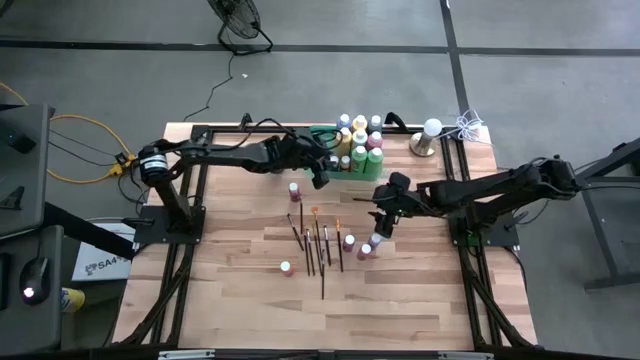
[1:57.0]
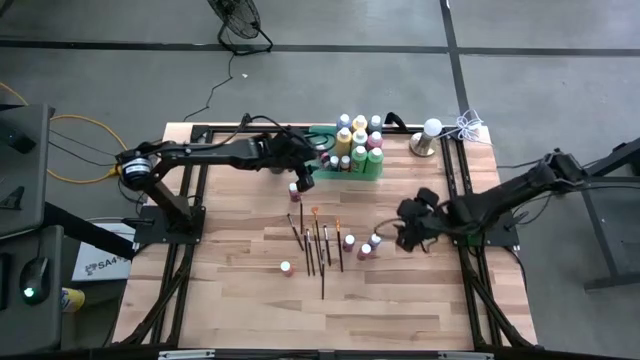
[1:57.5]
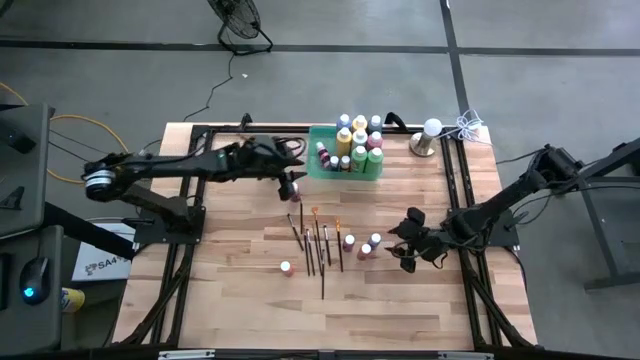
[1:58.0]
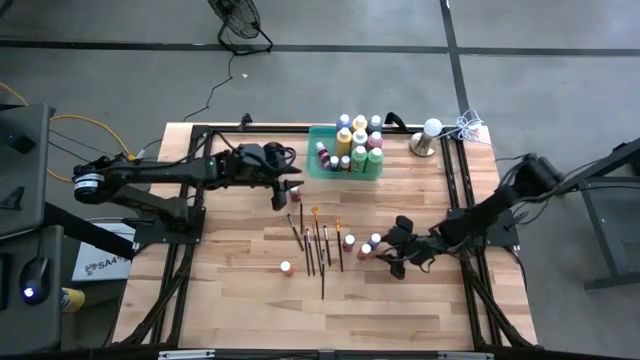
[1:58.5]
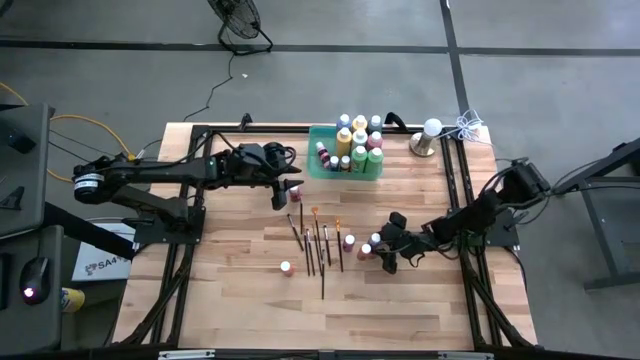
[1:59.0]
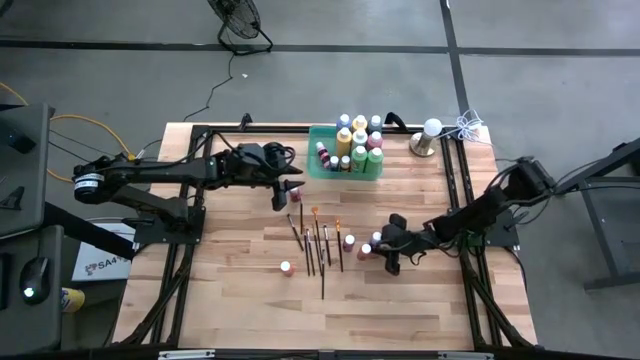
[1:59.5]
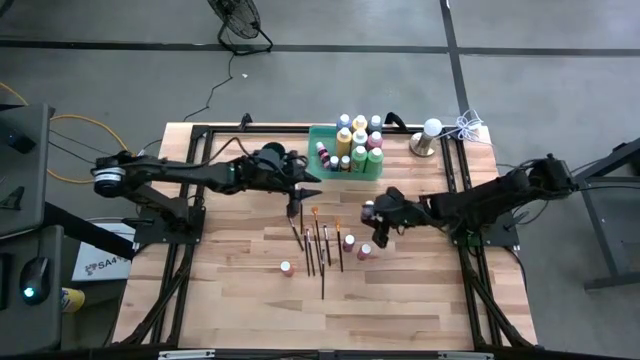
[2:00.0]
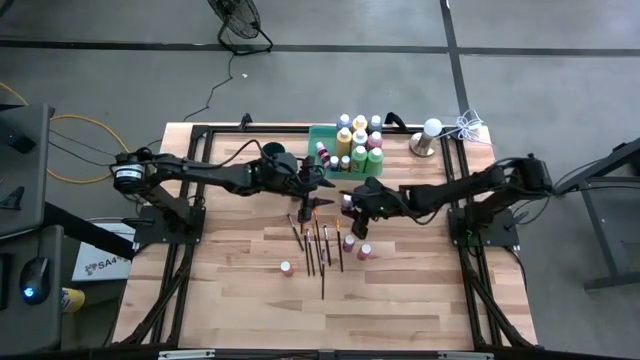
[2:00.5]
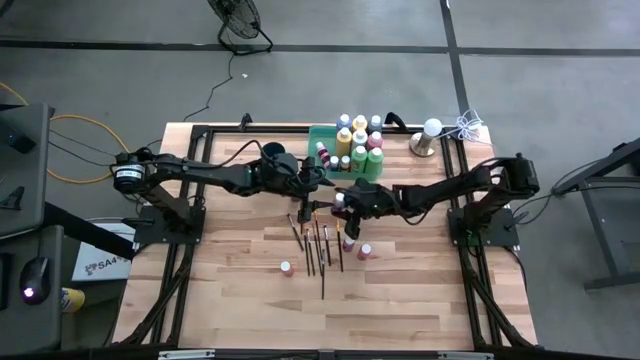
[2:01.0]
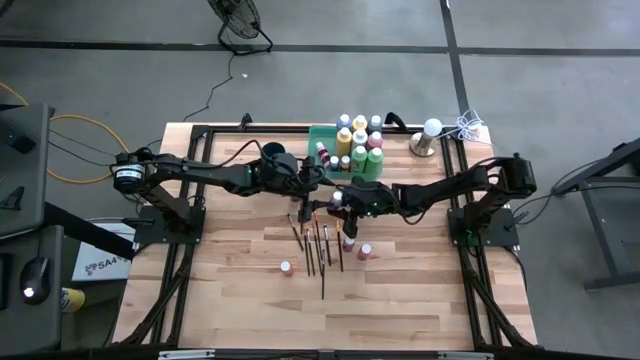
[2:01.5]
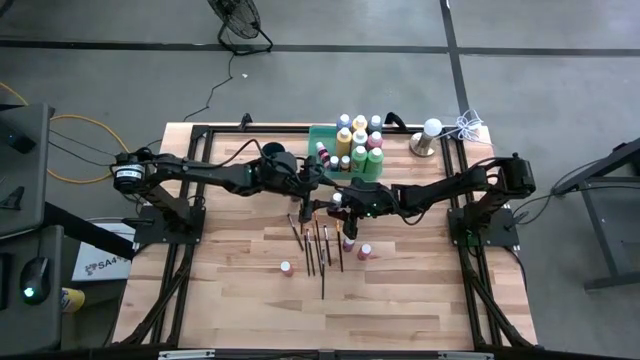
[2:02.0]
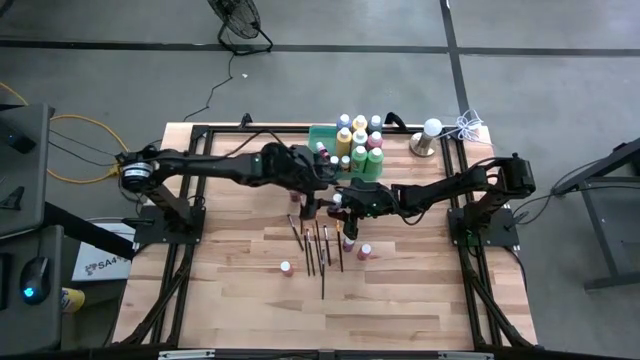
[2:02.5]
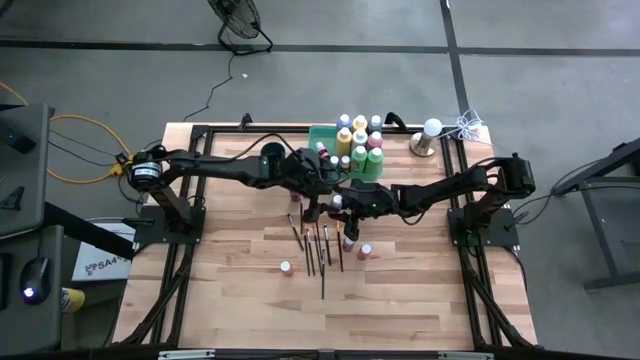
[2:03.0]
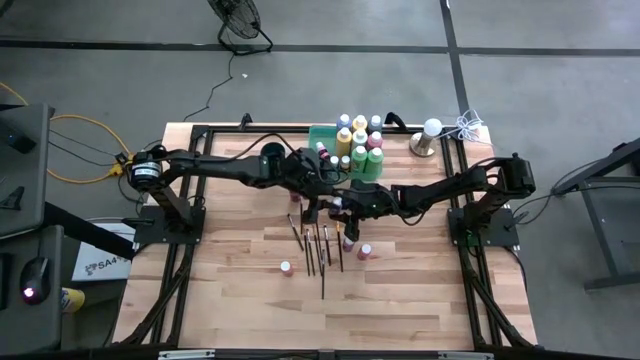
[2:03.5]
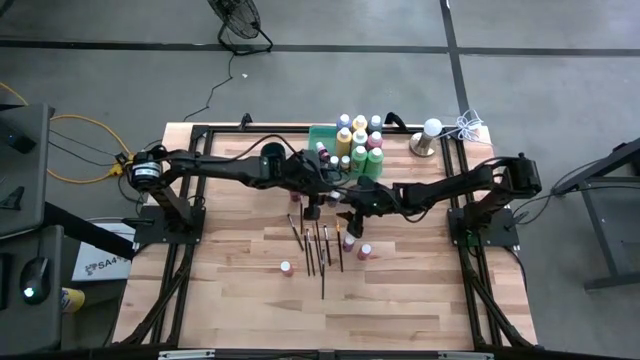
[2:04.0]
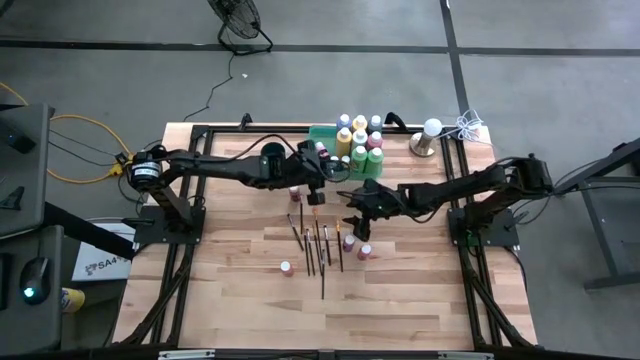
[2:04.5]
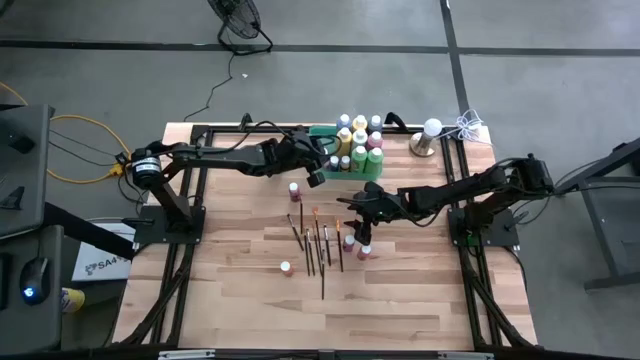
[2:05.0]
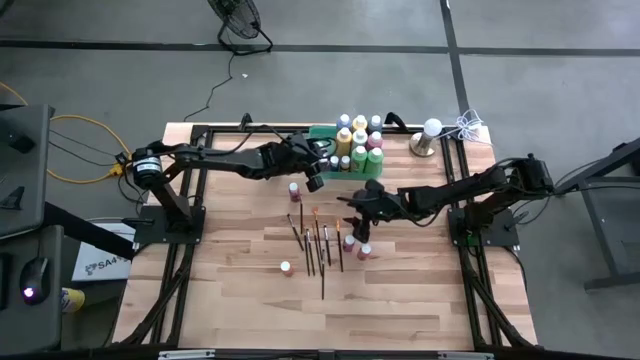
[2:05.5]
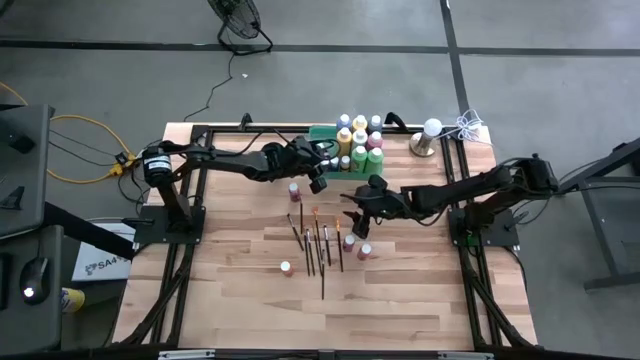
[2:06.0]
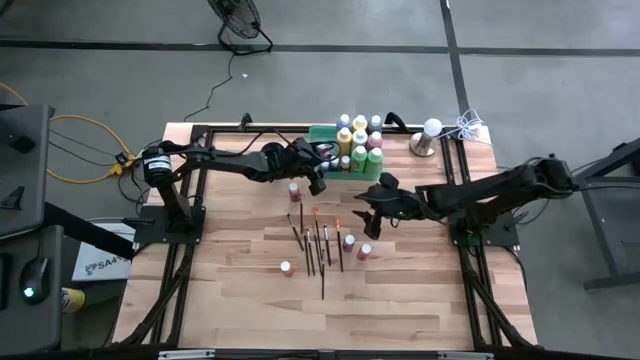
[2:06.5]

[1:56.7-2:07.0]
Task: Pick & Place Paint Supplies
Put the small light blue paint bottle into the green bin

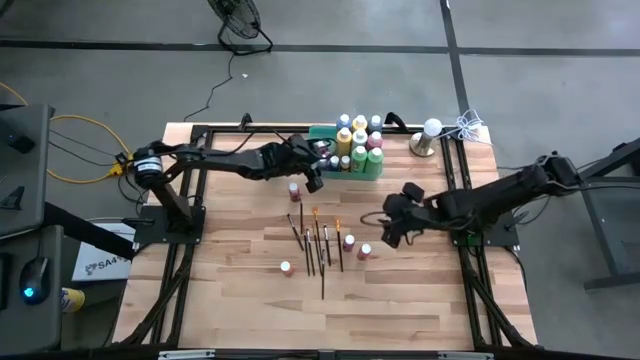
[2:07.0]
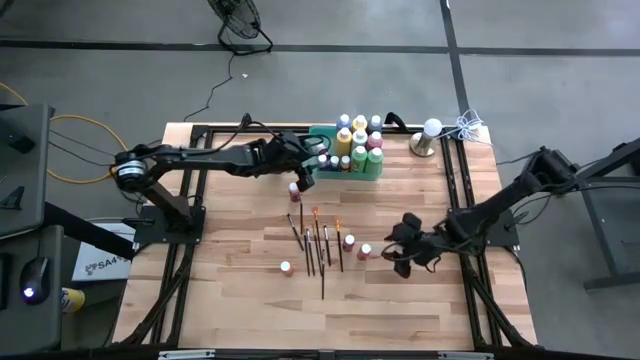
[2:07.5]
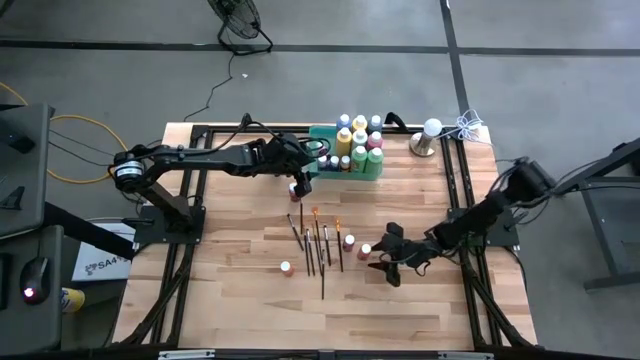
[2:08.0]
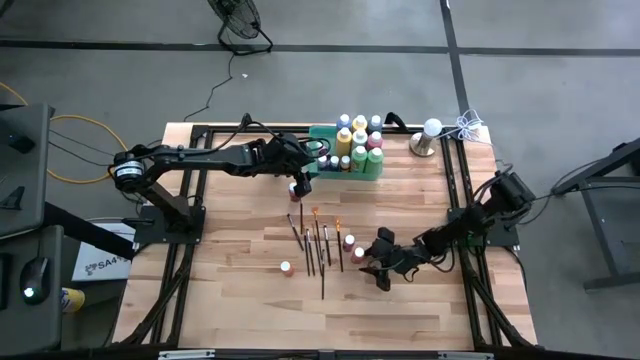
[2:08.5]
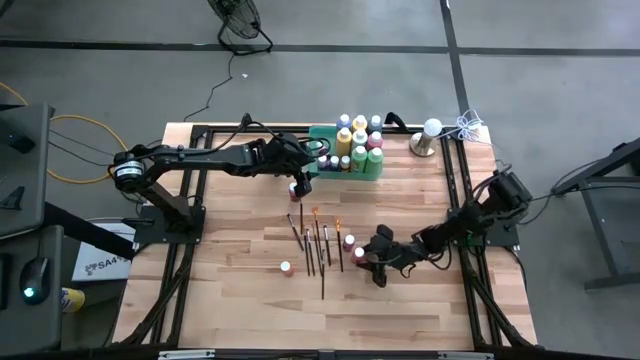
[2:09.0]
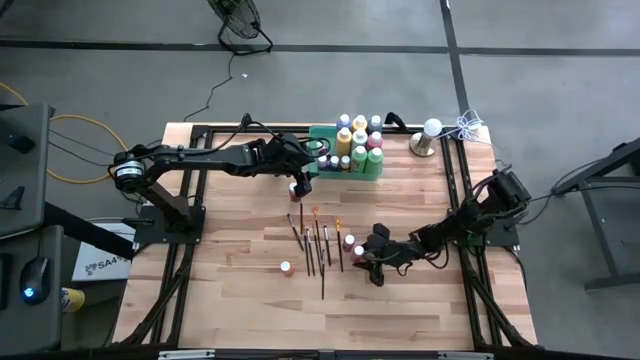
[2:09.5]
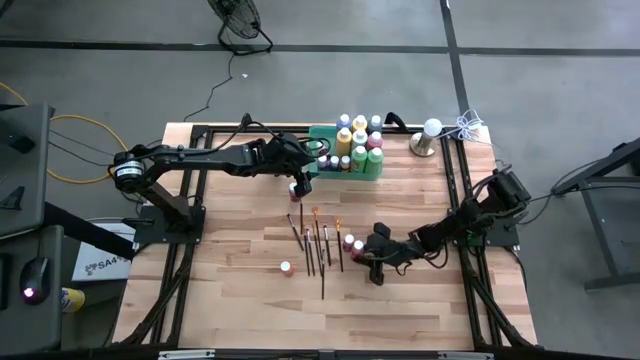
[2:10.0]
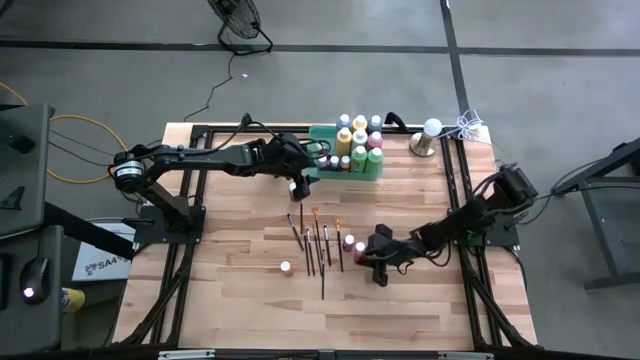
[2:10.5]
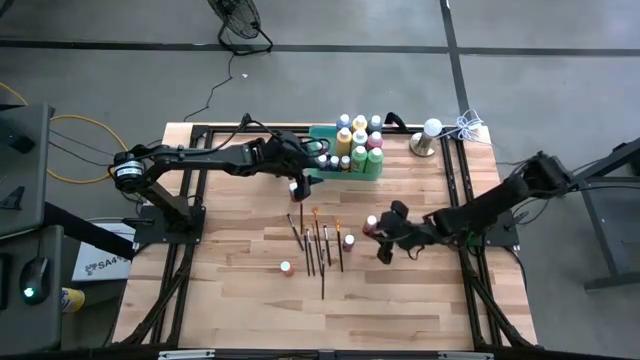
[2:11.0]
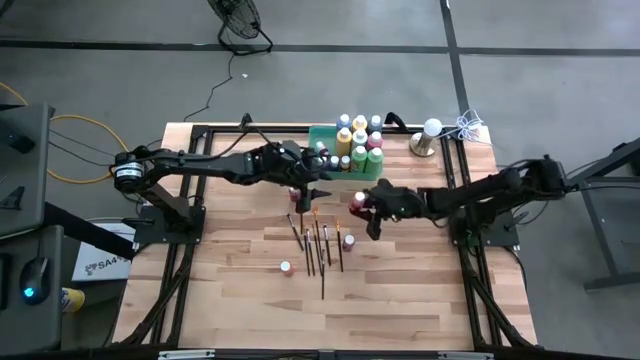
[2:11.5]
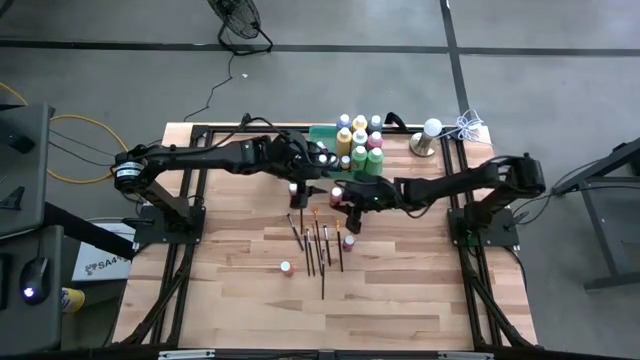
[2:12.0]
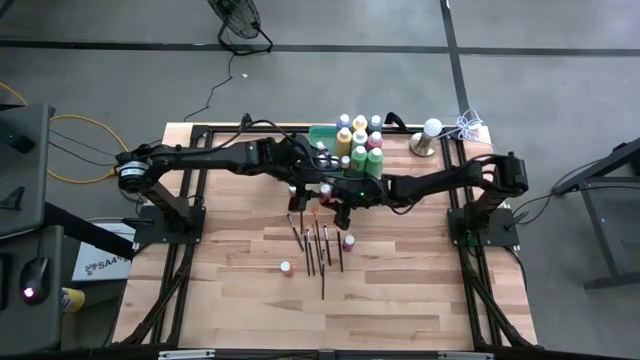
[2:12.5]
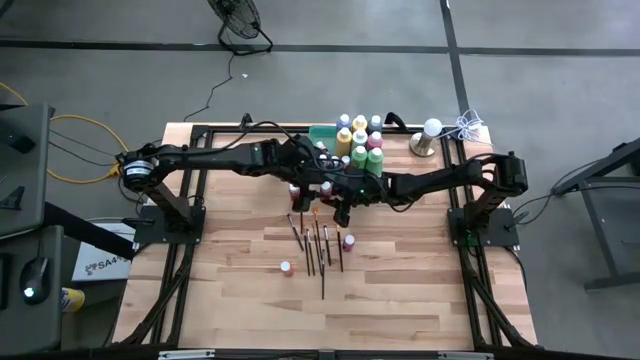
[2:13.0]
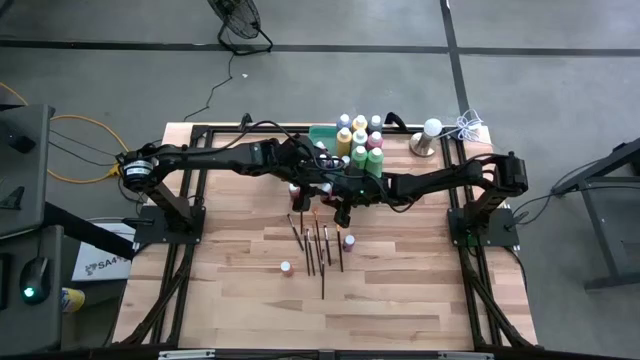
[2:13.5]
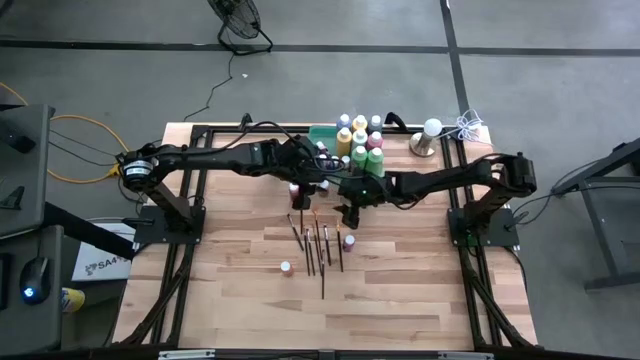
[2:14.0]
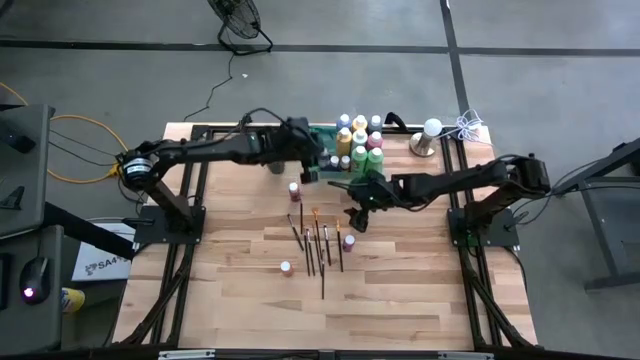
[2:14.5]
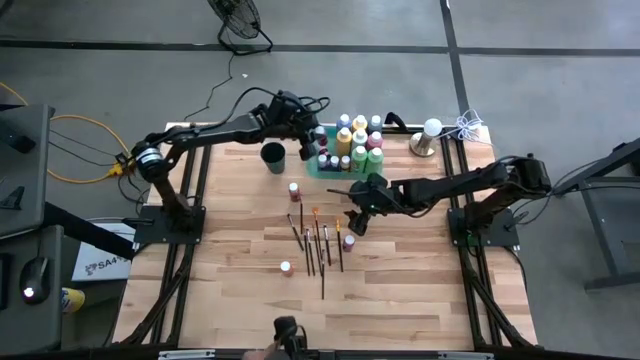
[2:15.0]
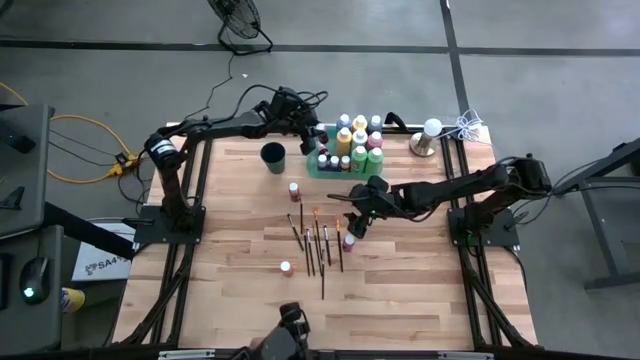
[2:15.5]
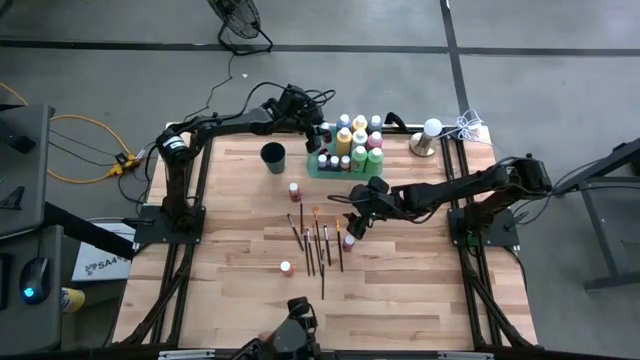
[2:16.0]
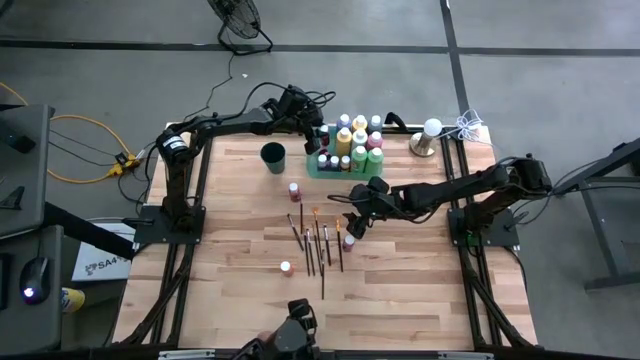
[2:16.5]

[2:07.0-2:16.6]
Put the small dark orange paint bottle into the green bin

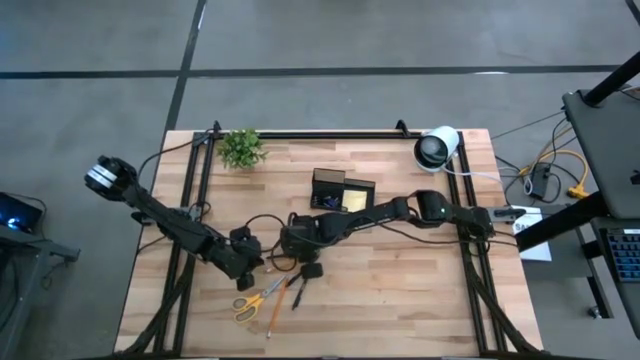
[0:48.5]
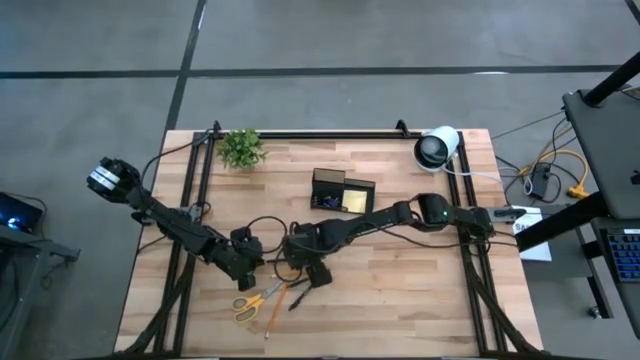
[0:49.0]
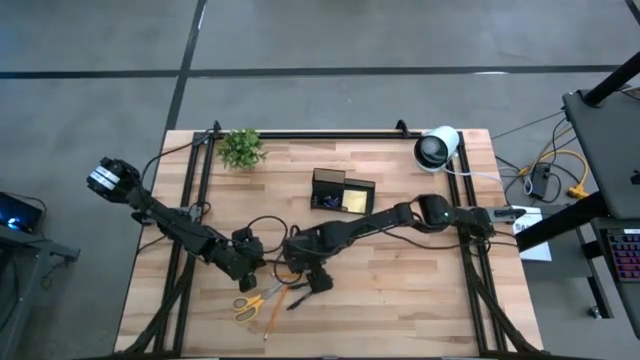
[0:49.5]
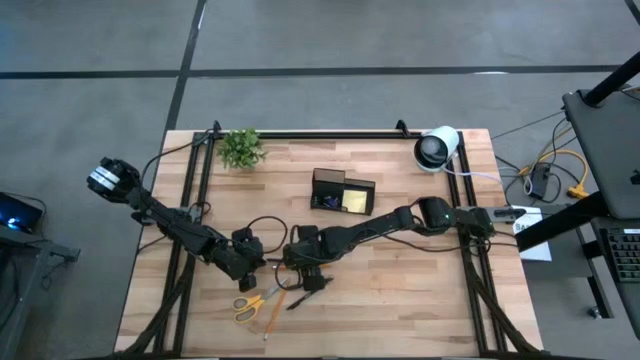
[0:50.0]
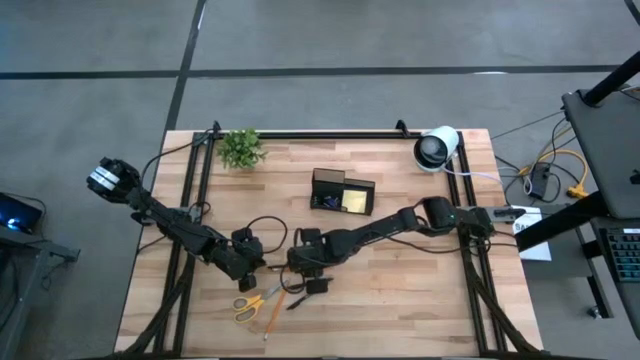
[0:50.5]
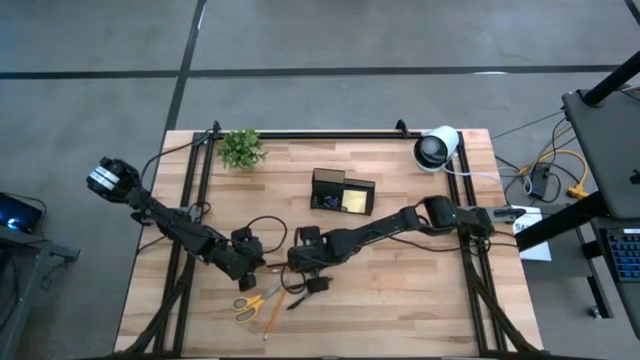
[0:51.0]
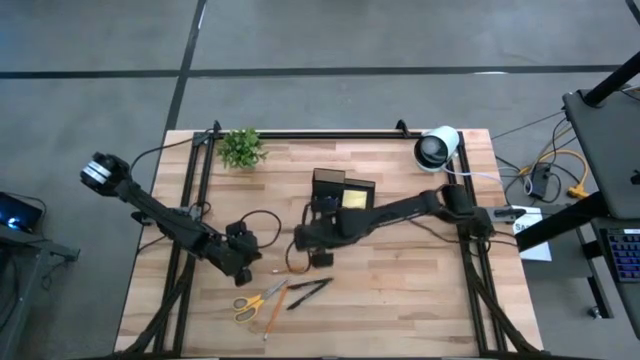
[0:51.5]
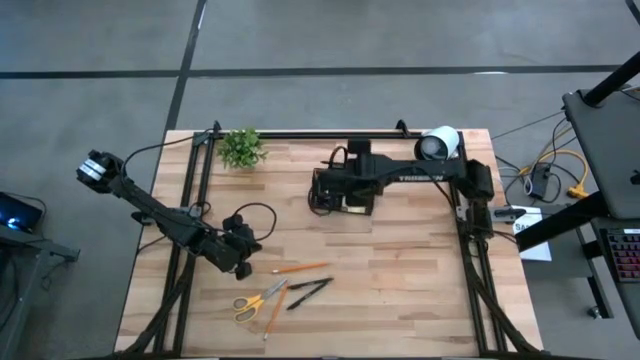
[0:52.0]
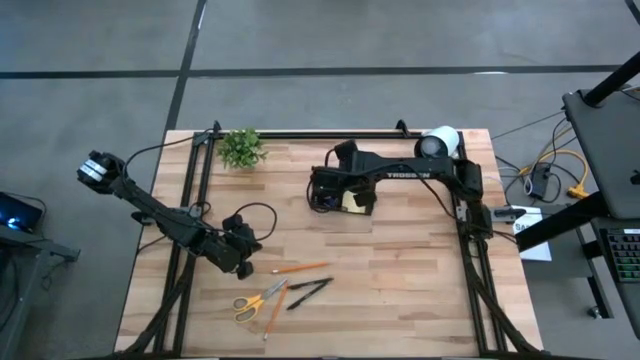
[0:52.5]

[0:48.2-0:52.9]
Task: Pick and place office supplies into organizer
Put the top left black pen into the black desk organizer
